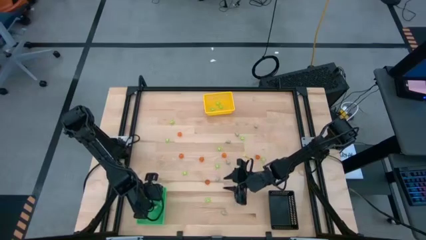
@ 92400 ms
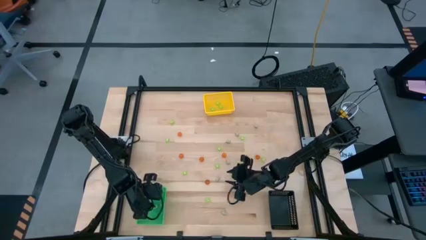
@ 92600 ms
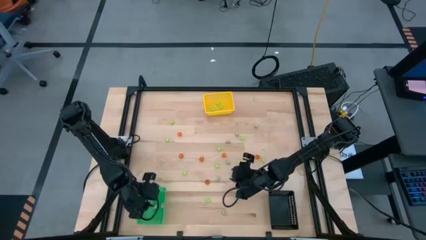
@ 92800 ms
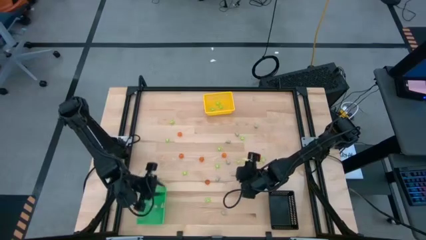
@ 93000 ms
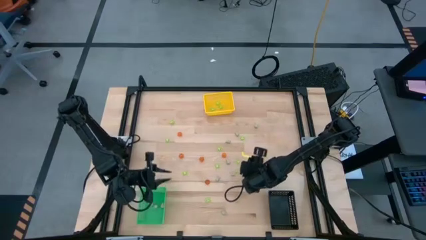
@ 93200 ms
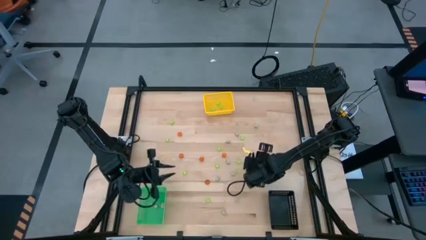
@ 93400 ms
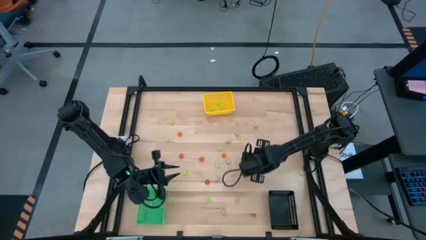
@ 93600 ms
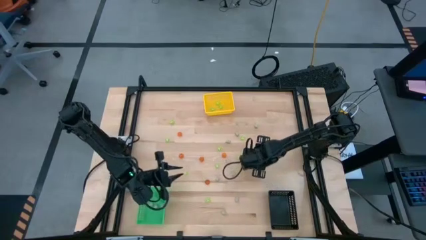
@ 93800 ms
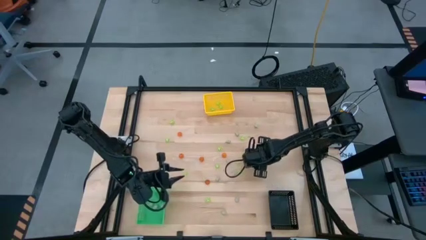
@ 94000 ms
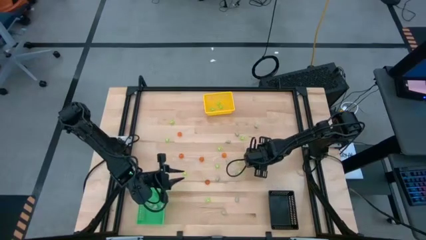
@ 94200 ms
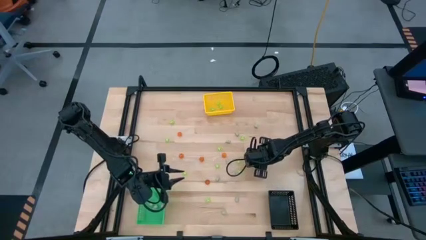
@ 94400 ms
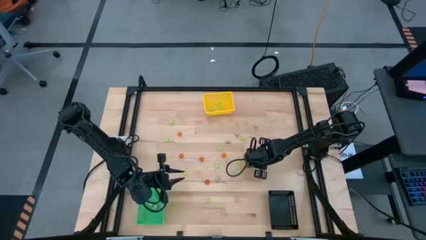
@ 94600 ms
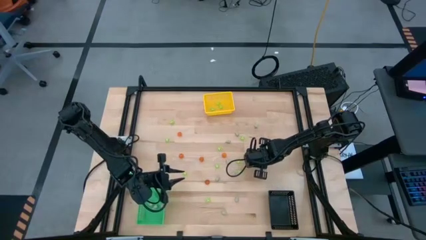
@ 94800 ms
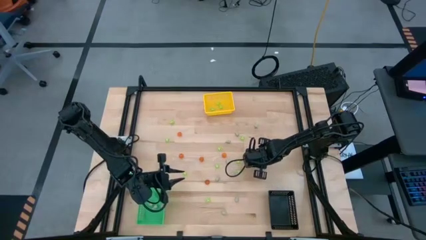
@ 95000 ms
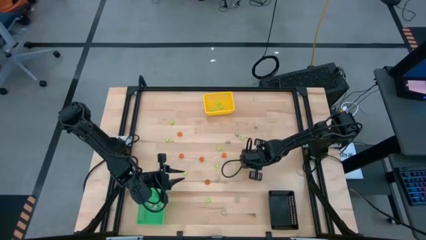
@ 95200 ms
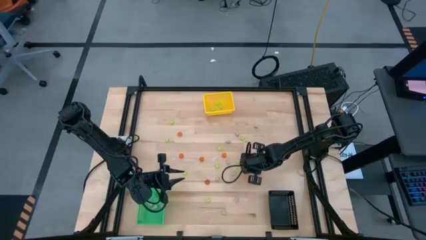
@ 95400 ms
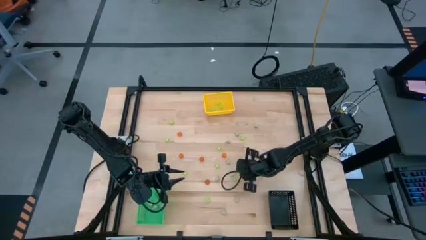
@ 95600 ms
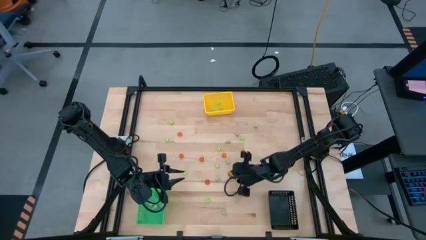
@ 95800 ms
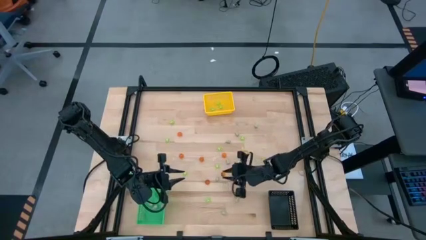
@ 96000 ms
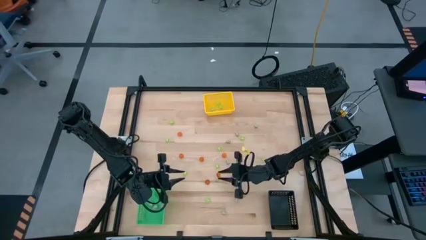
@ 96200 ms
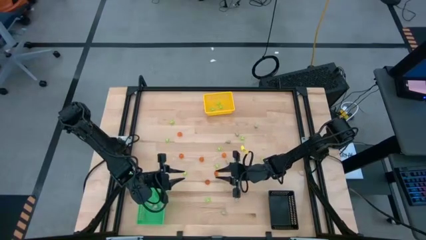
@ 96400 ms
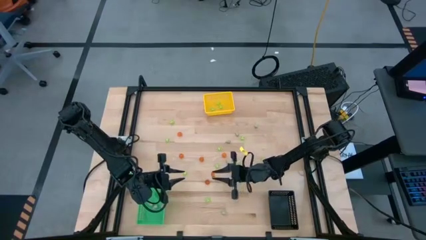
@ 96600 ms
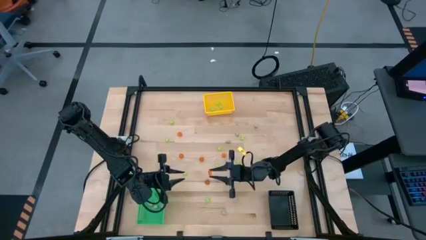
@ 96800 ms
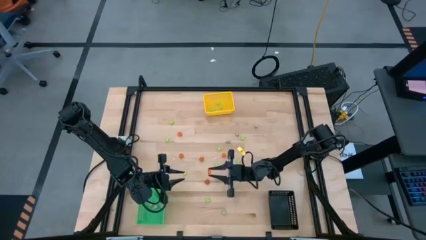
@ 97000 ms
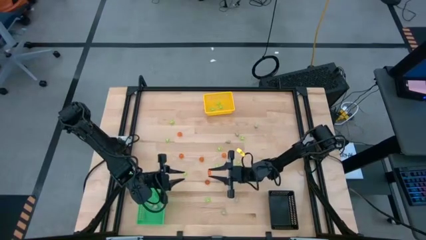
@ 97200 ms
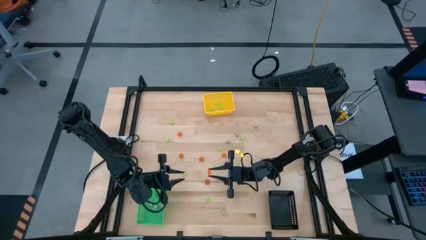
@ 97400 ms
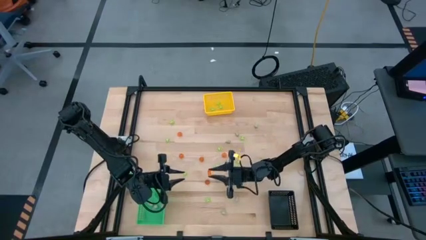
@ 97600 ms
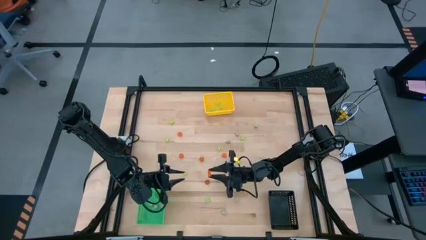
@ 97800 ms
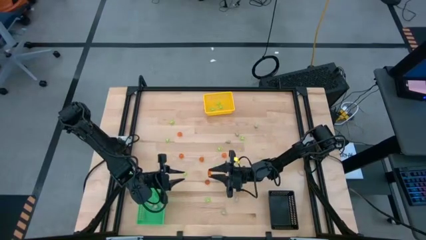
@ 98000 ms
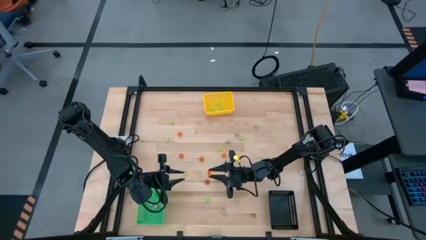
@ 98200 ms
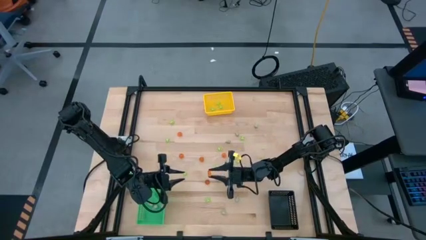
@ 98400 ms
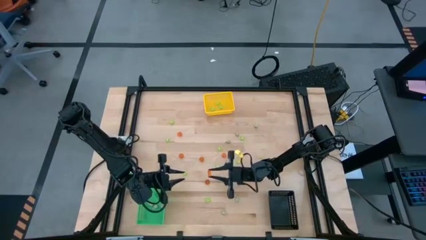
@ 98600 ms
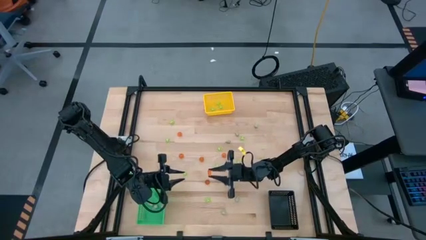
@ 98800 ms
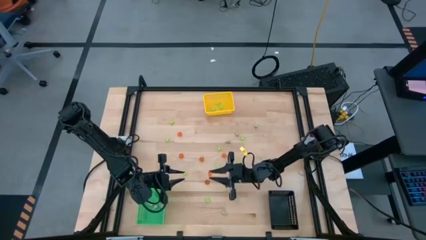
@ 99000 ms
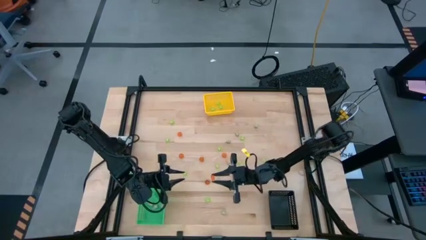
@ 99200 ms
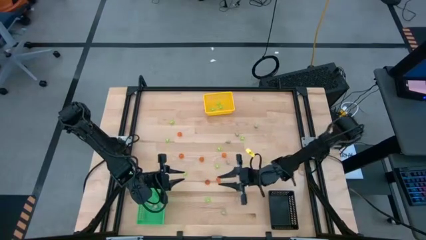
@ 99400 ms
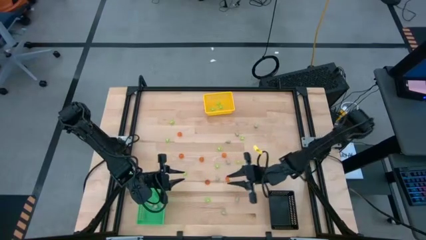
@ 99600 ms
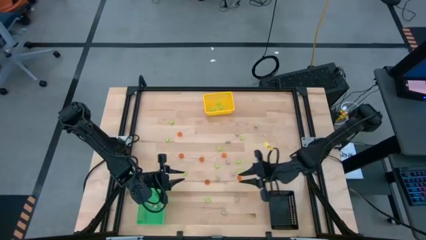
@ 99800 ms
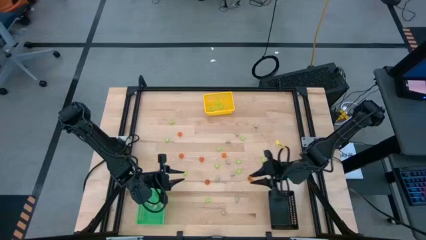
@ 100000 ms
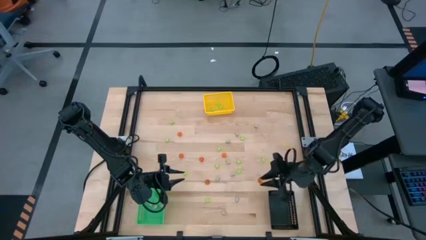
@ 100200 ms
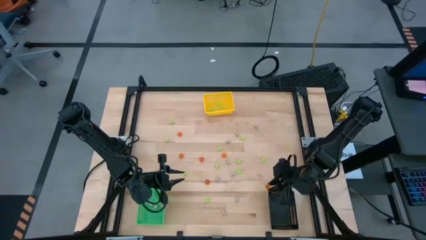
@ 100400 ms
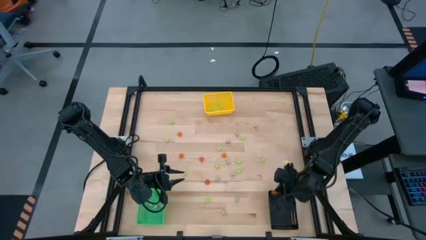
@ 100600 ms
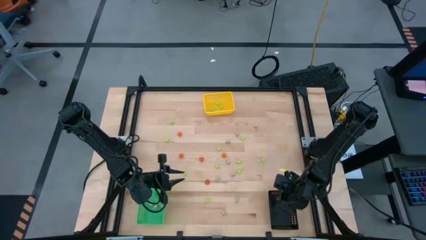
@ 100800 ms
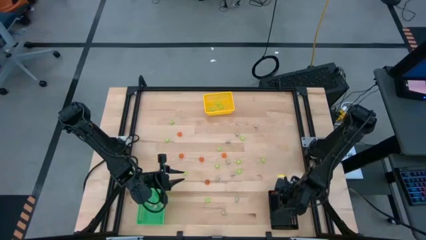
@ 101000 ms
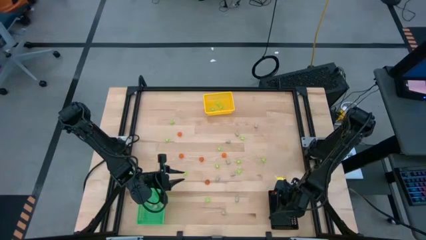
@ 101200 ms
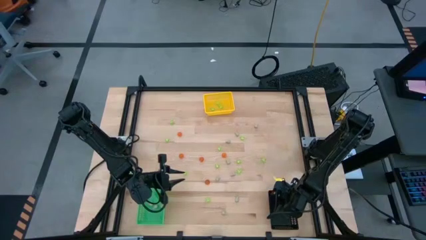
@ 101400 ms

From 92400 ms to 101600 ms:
Task: Sort Halloween decoration
Put the orange pumpkin toy into the black bin
